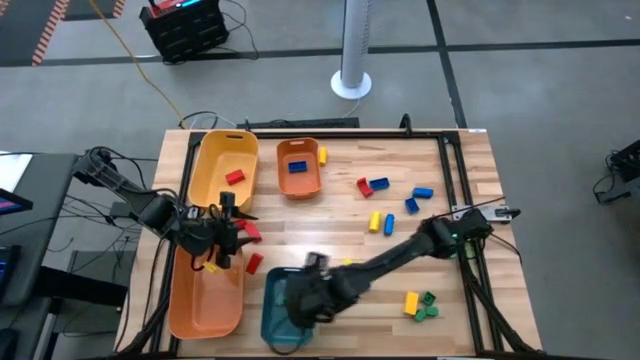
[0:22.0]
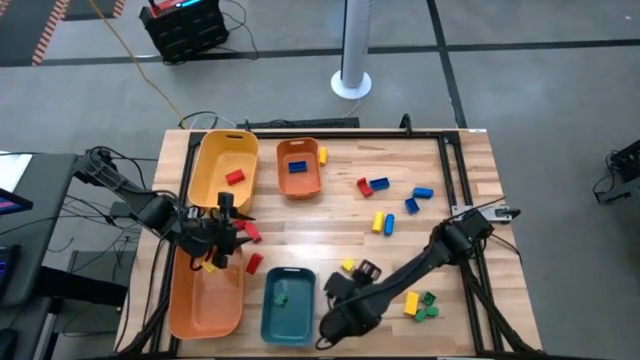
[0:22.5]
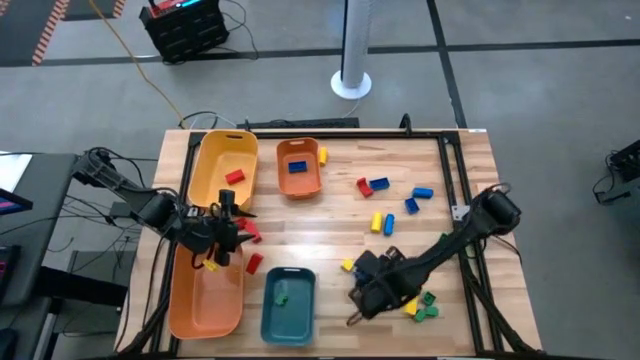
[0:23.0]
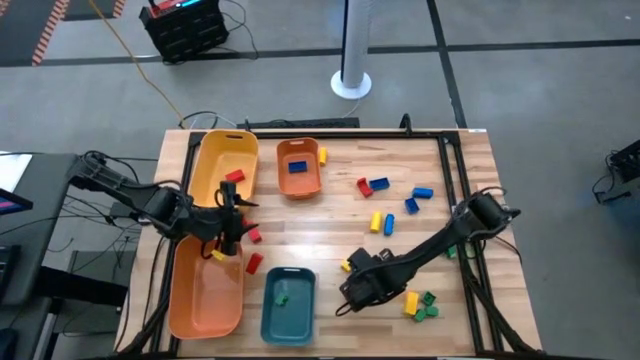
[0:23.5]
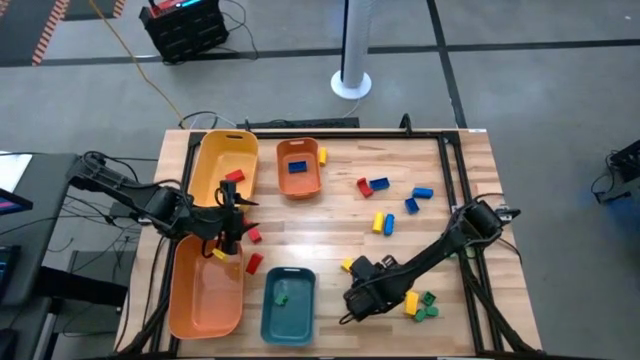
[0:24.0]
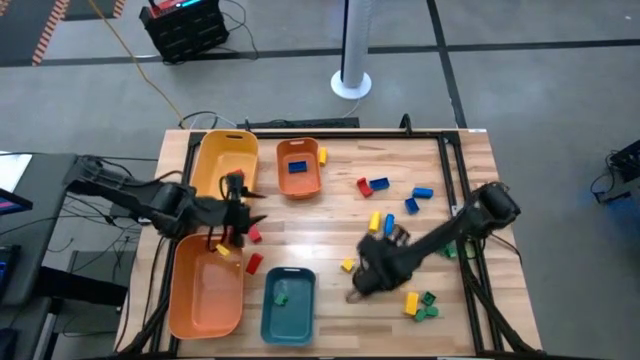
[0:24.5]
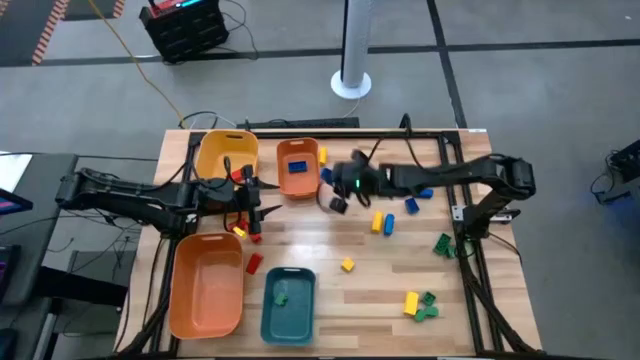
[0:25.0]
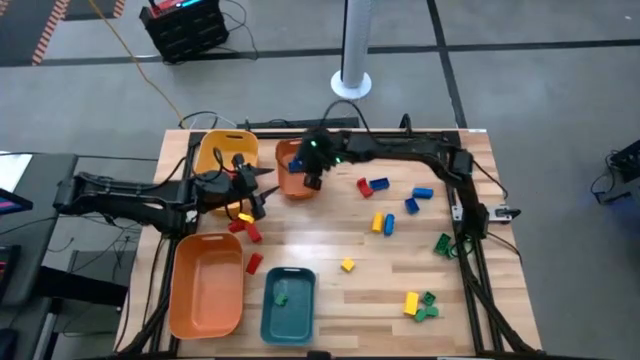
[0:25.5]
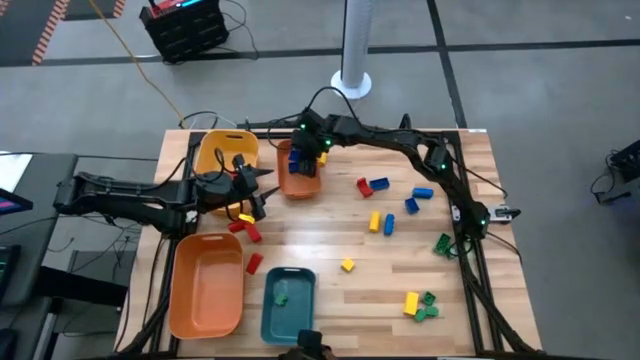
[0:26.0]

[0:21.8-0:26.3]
Task: Sort blocks
Put the blue game piece into the top orange bin

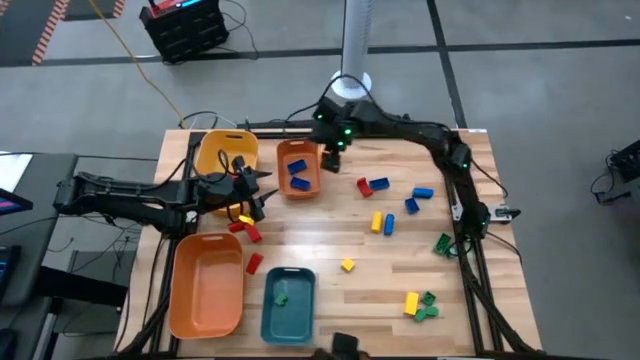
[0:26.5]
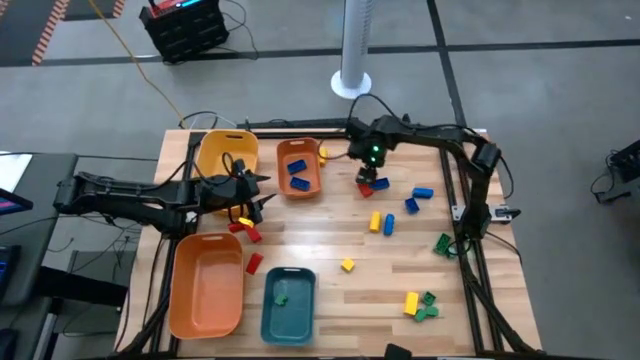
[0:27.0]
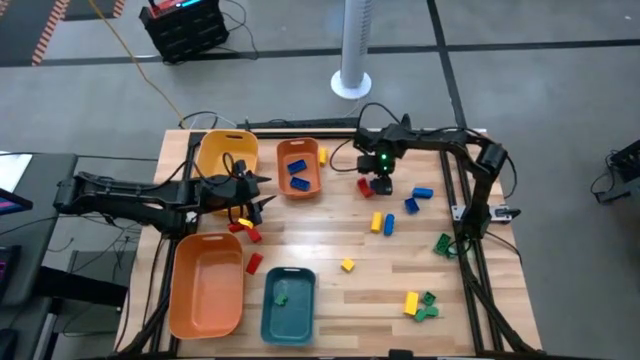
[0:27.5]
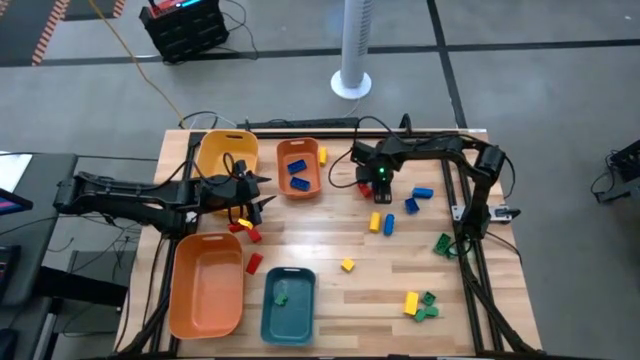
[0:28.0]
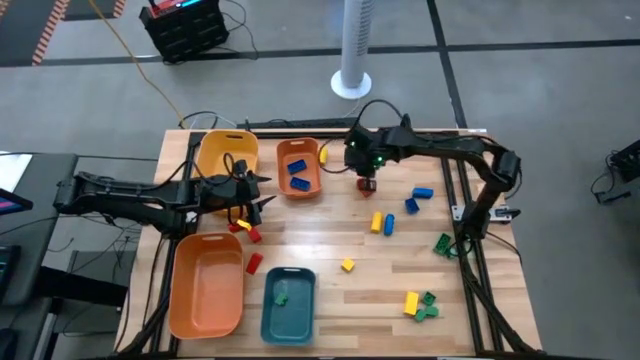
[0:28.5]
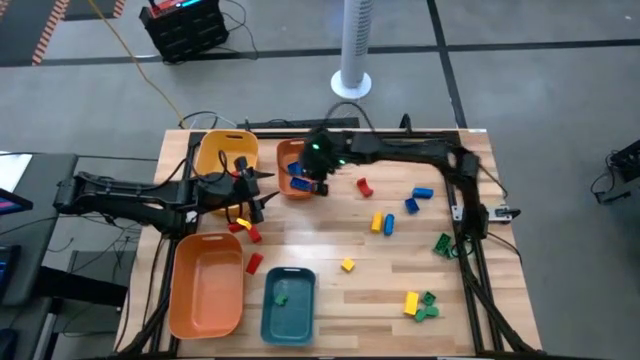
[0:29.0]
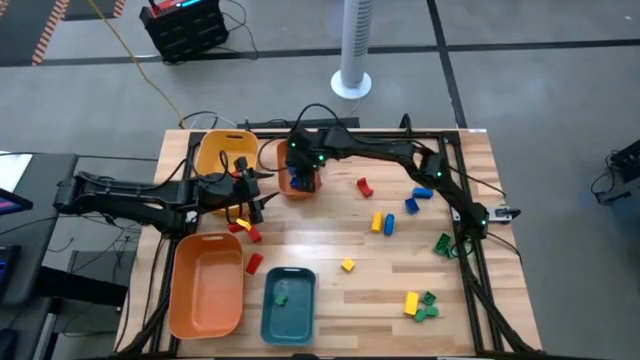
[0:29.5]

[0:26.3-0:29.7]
Put the blue game piece into the top orange bin

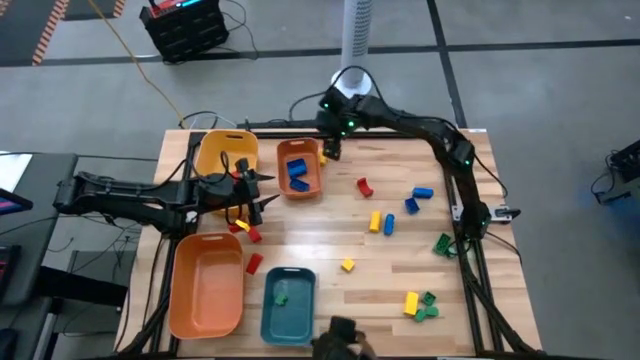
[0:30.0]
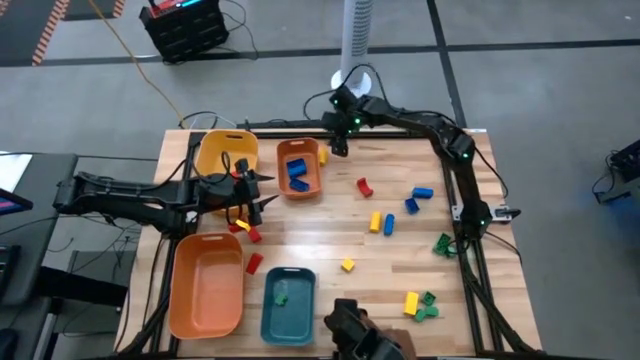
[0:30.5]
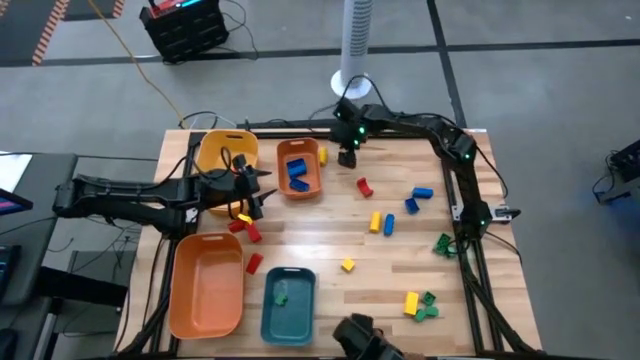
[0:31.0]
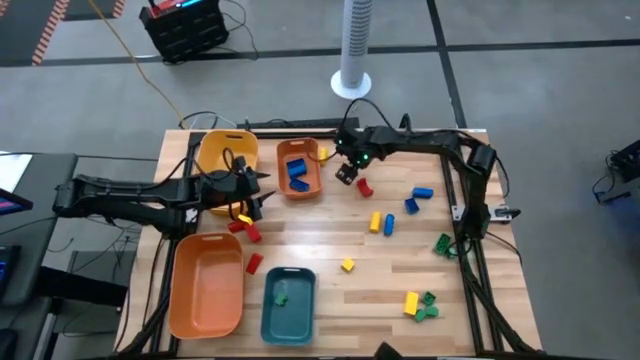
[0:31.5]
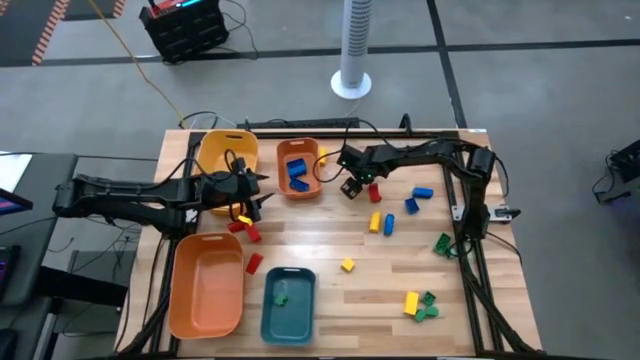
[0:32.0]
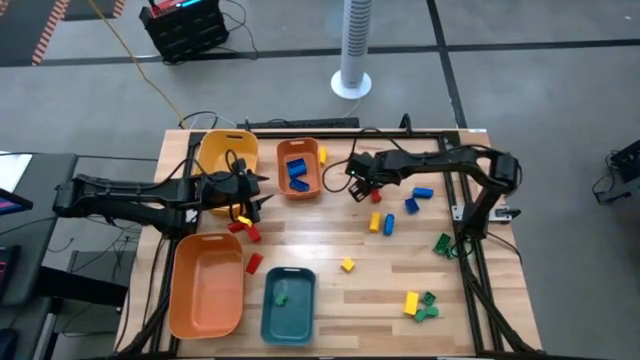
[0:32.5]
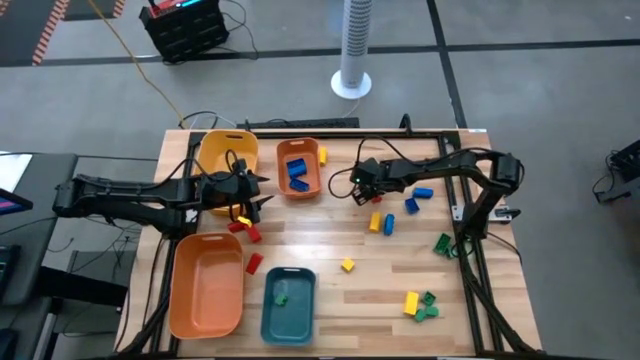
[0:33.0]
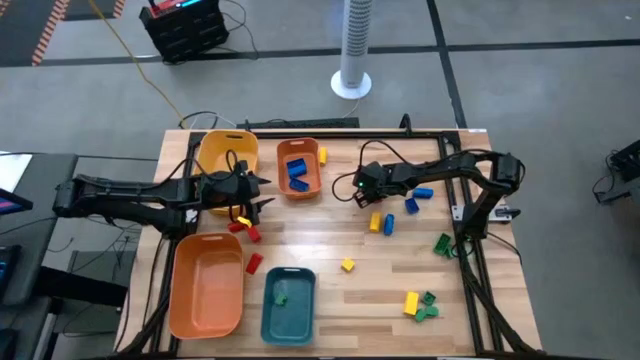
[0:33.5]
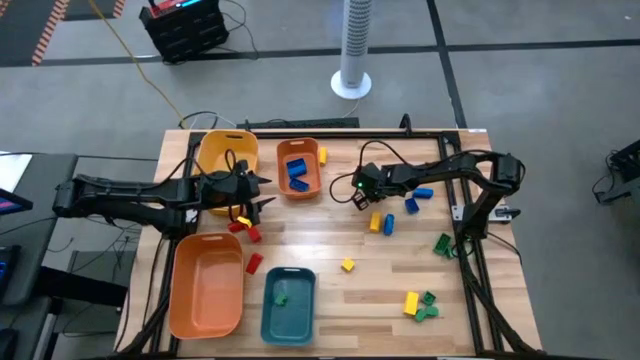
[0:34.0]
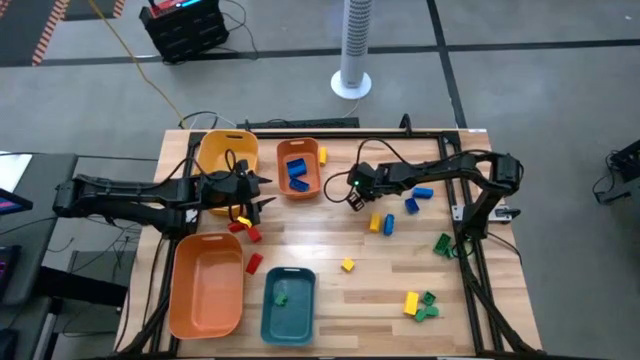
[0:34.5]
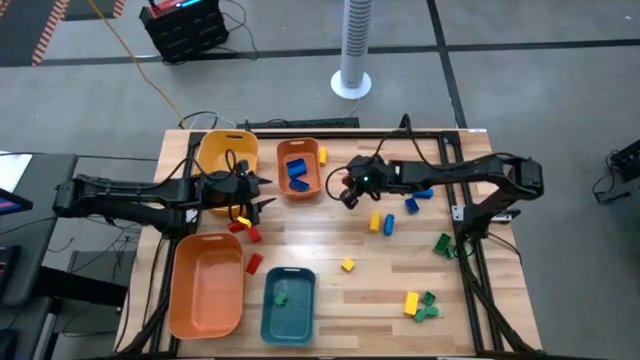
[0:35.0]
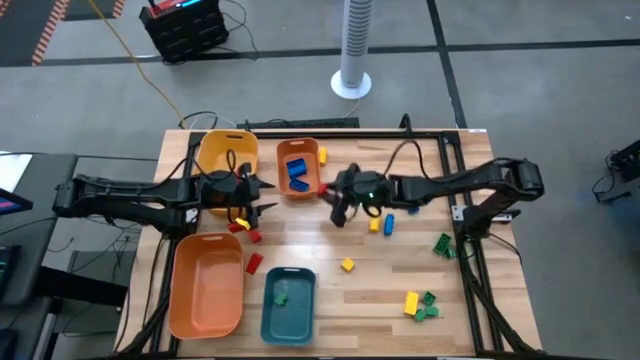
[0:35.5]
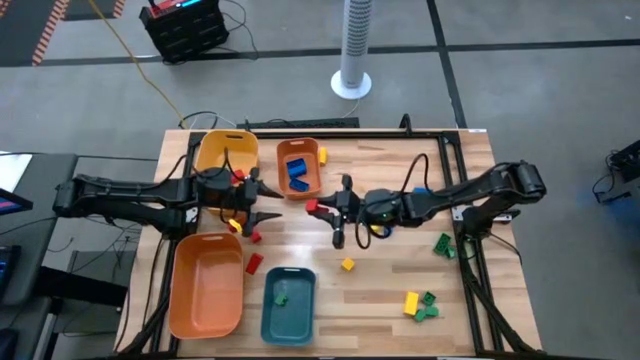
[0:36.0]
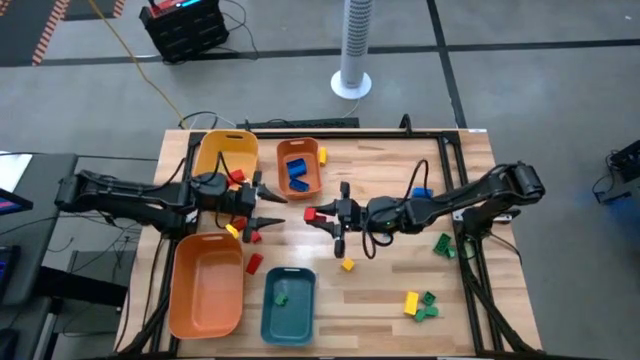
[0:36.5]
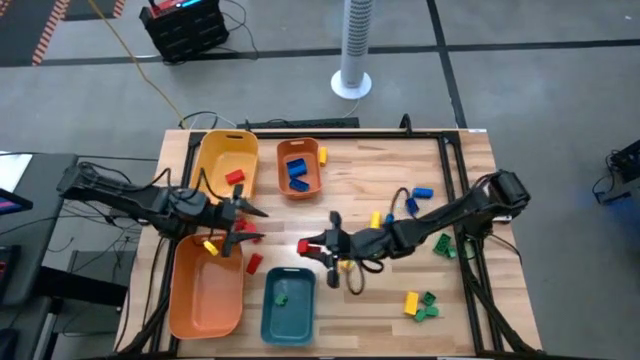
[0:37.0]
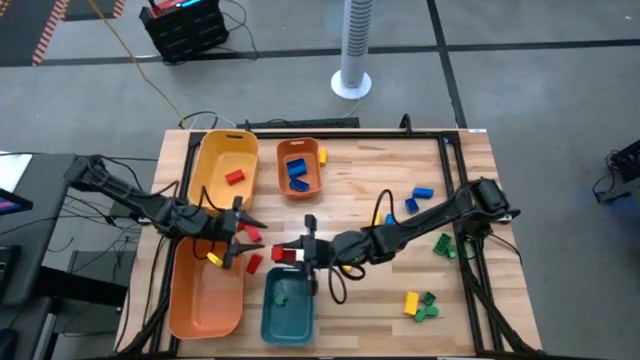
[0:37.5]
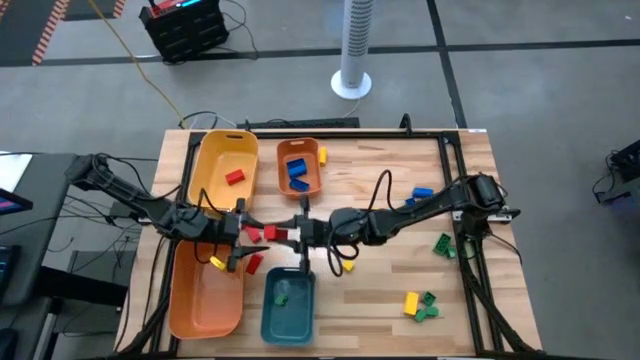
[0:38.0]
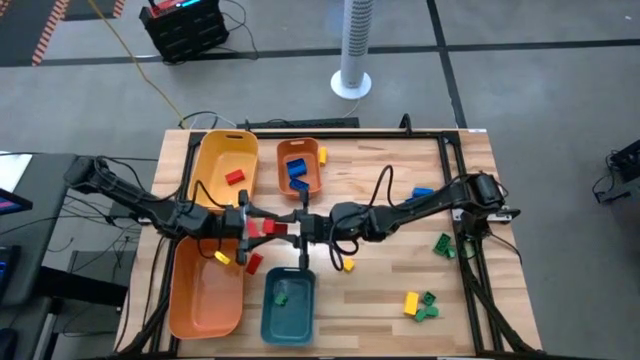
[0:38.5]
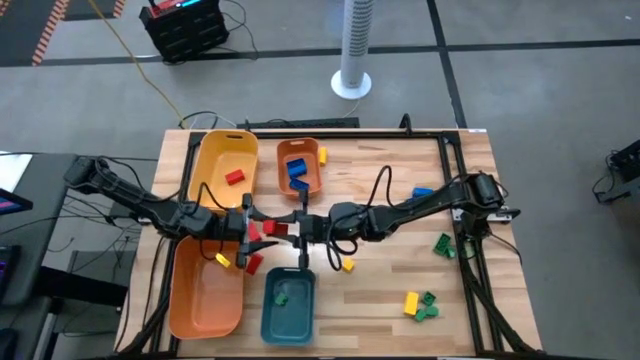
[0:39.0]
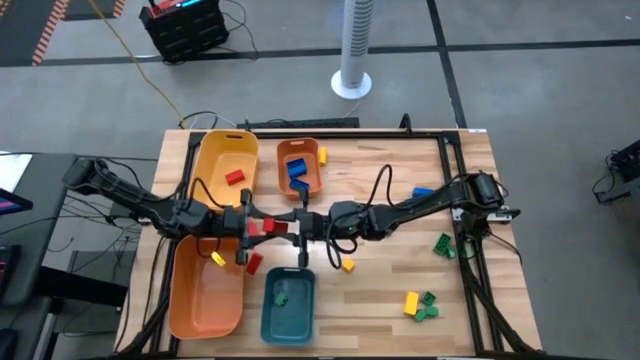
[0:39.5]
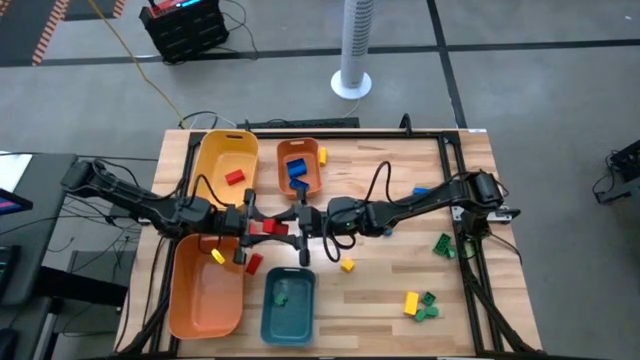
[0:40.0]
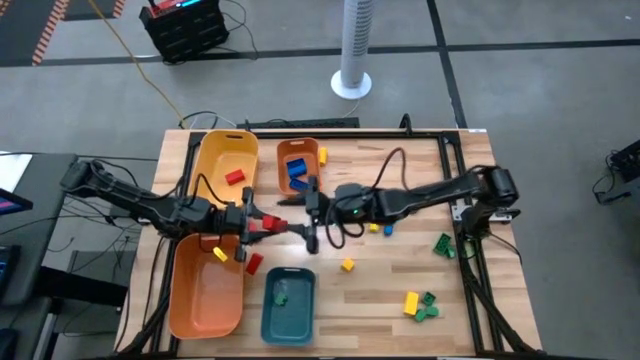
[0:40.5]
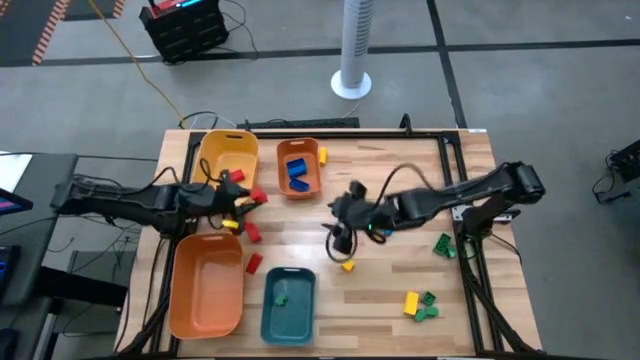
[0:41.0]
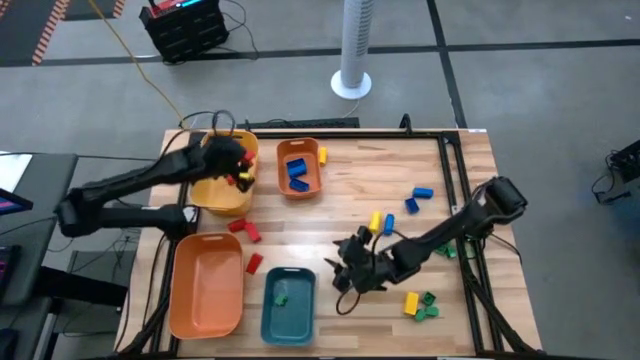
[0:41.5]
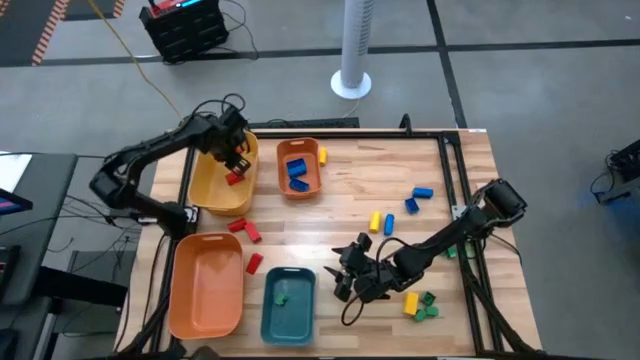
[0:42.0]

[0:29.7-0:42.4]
Put the red wooden block into the yellow bin

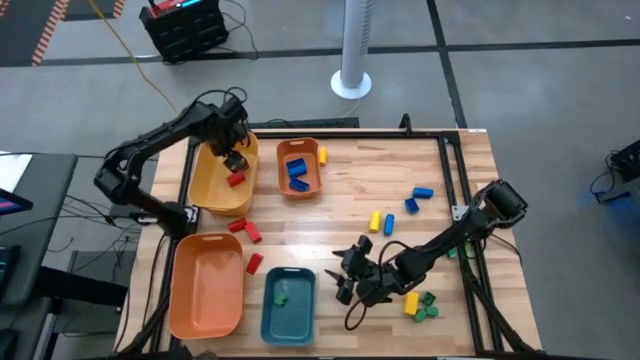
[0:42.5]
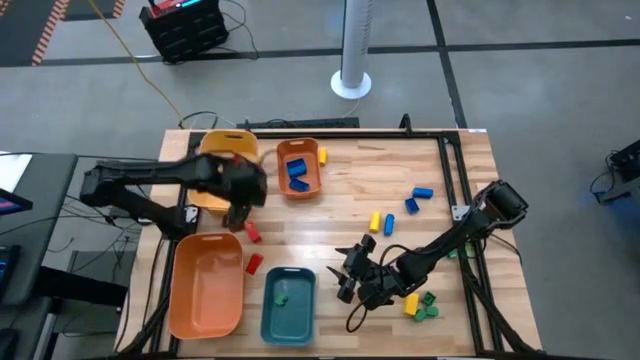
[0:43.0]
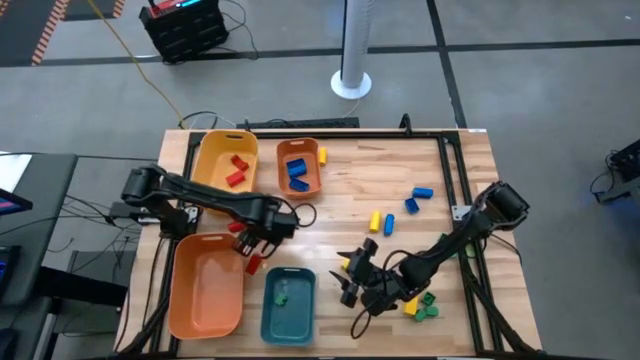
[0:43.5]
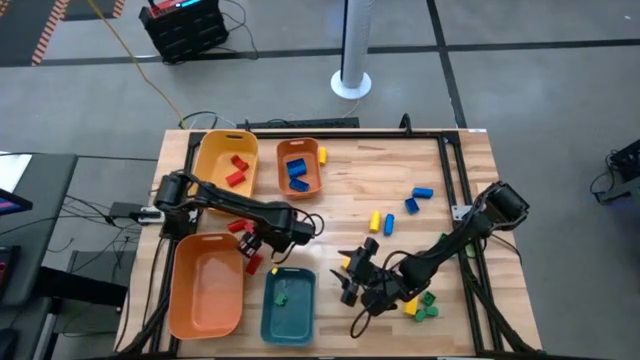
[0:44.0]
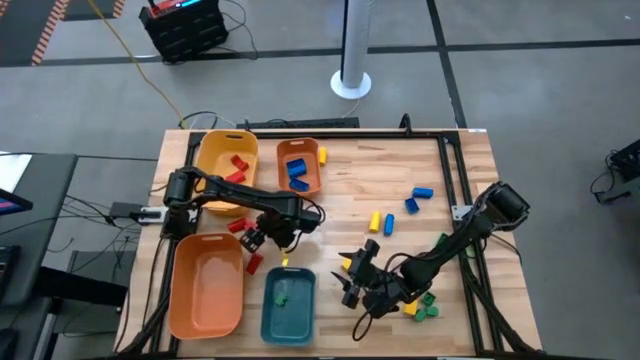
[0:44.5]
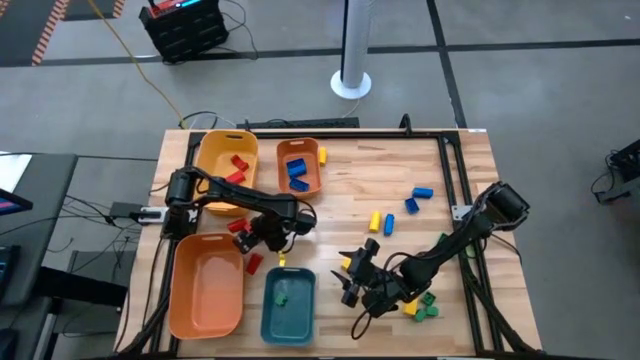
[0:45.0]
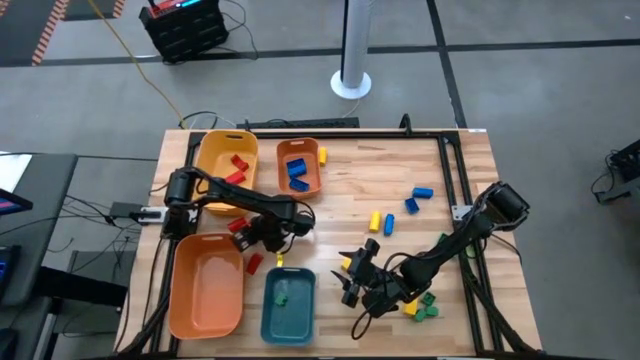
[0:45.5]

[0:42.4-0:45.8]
Put the red wooden block into the yellow bin
